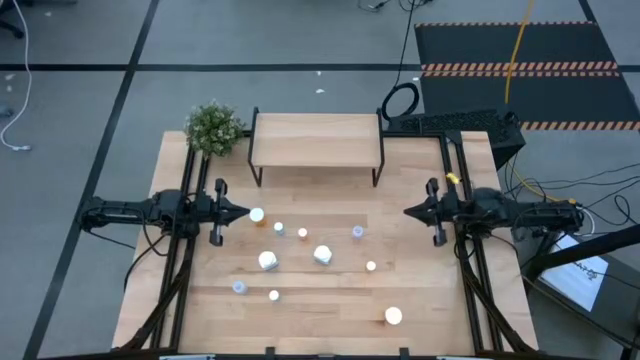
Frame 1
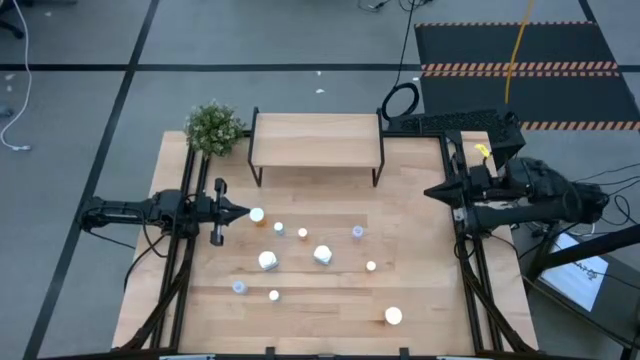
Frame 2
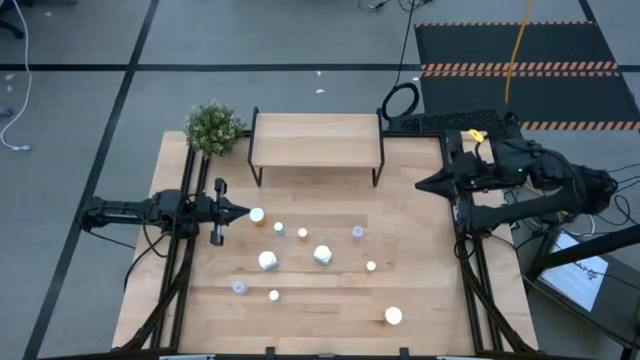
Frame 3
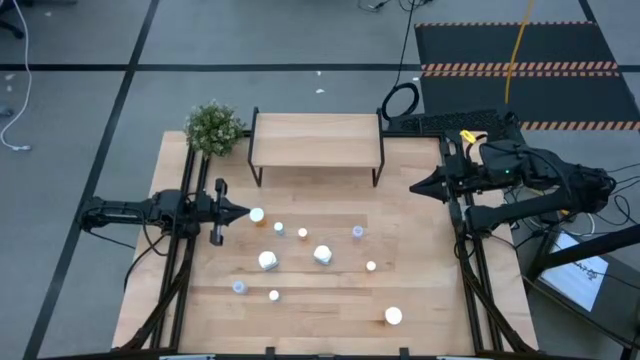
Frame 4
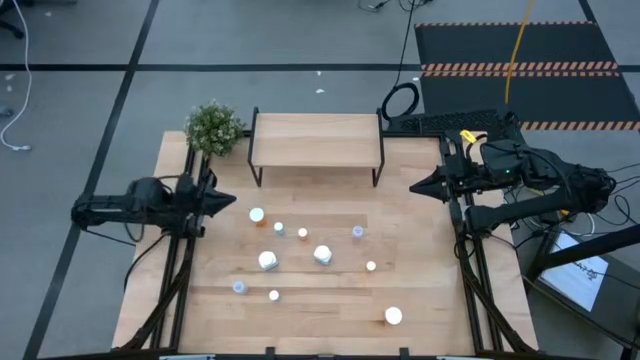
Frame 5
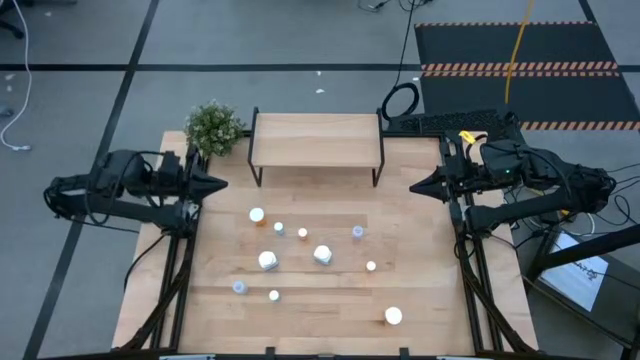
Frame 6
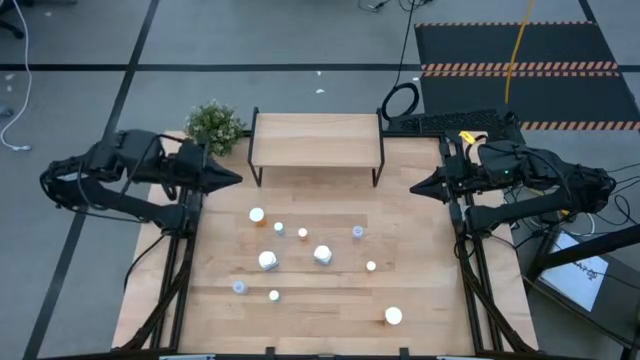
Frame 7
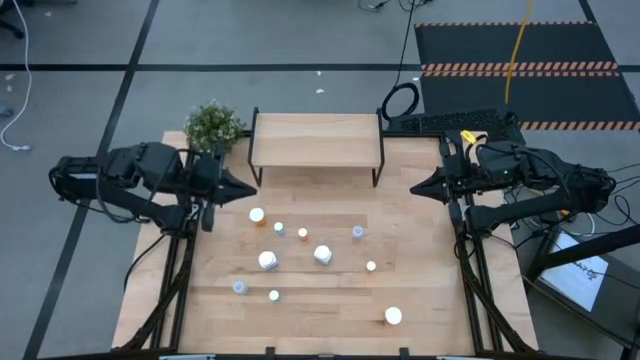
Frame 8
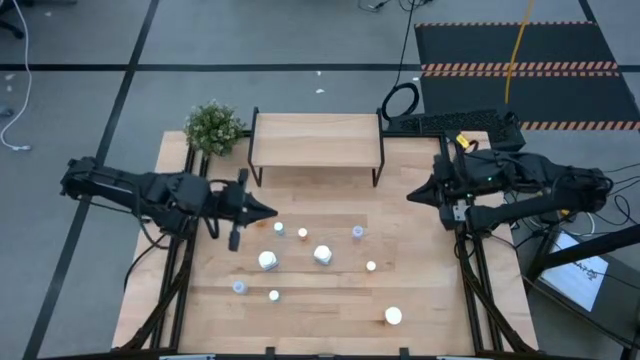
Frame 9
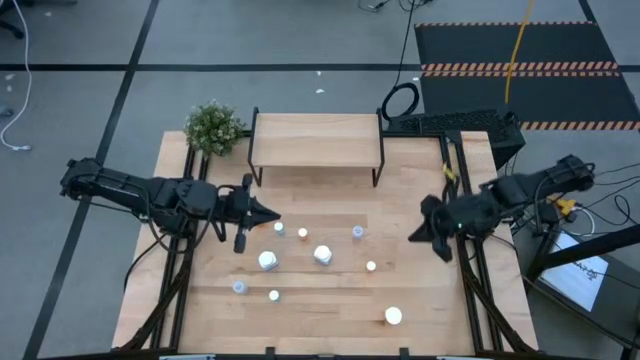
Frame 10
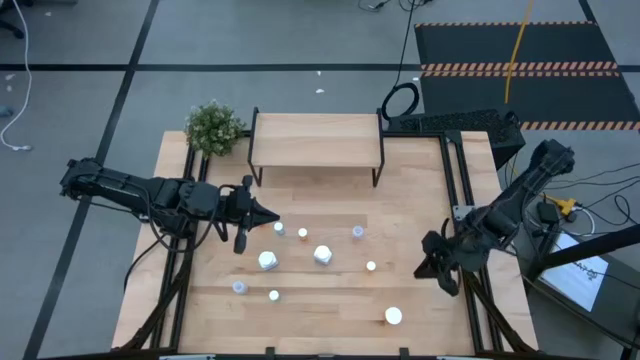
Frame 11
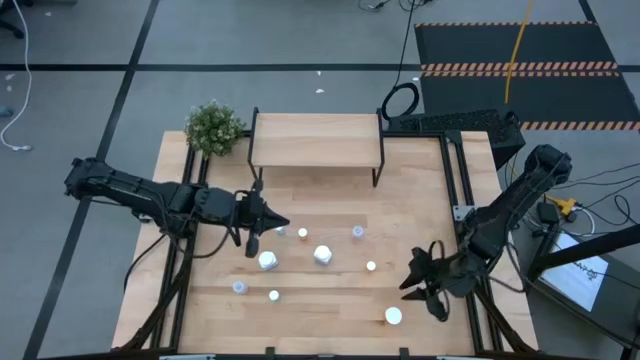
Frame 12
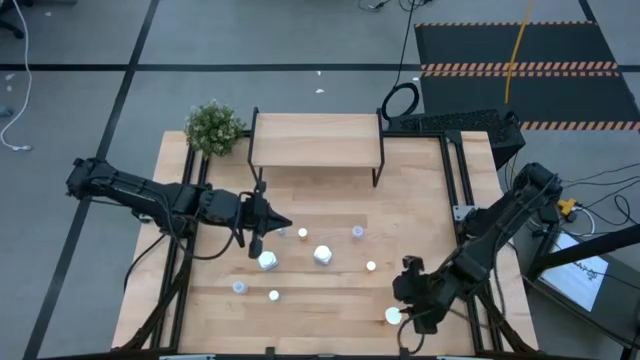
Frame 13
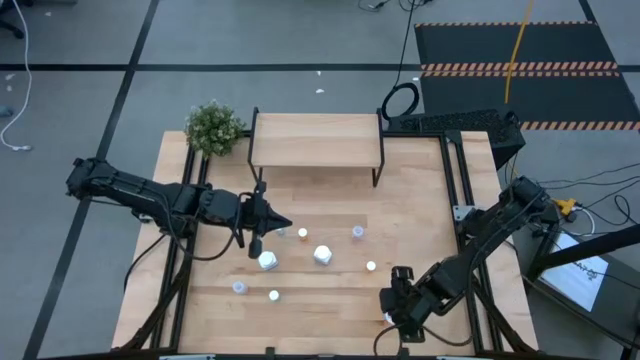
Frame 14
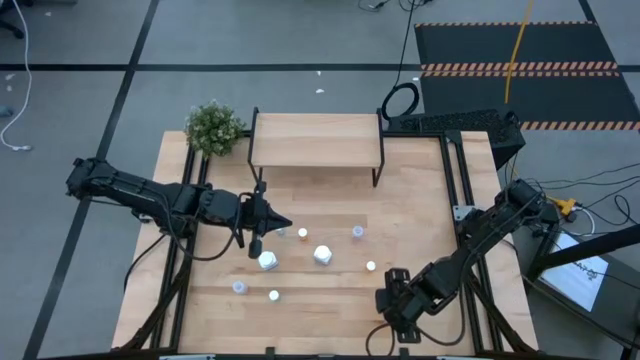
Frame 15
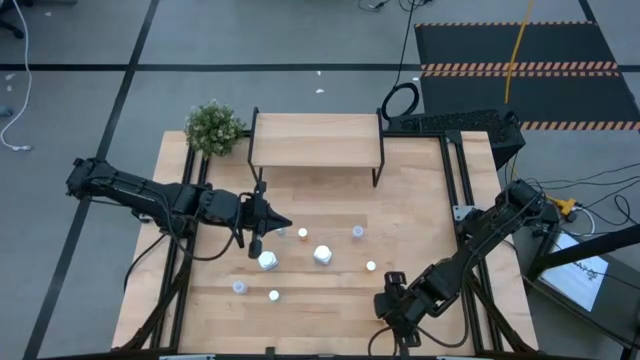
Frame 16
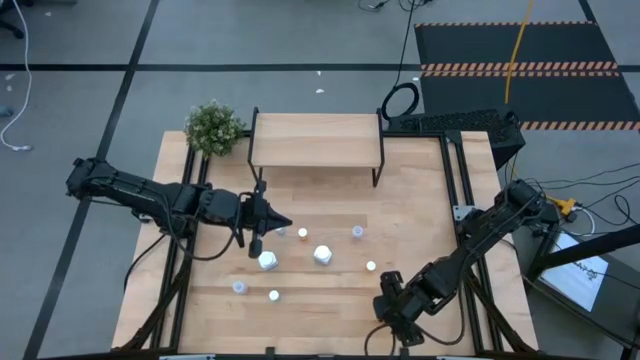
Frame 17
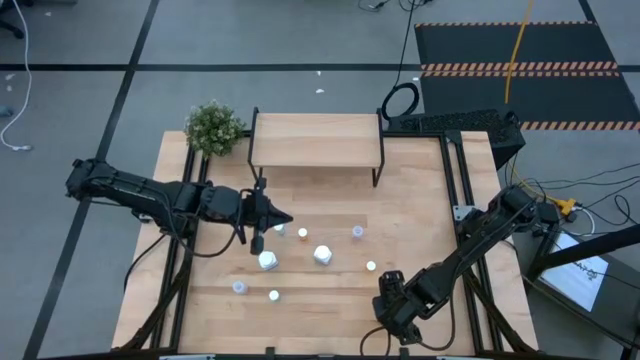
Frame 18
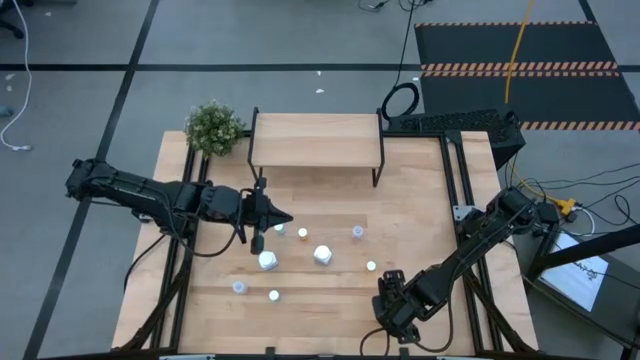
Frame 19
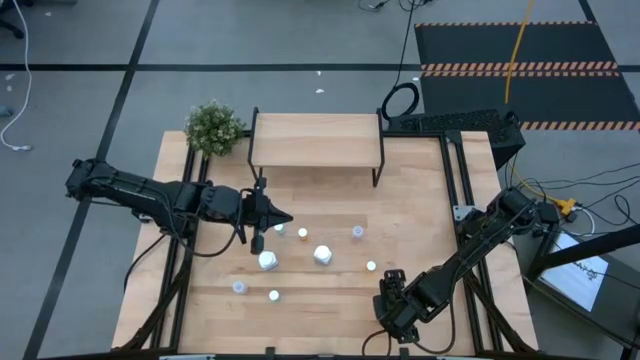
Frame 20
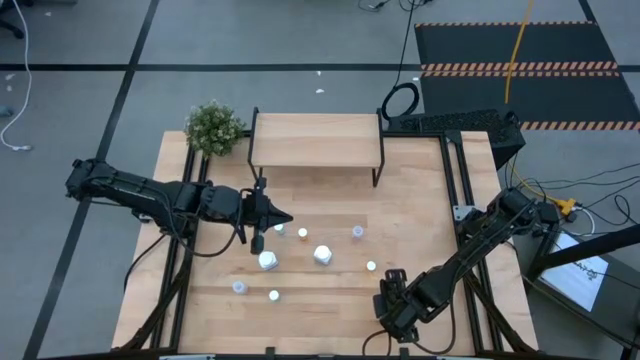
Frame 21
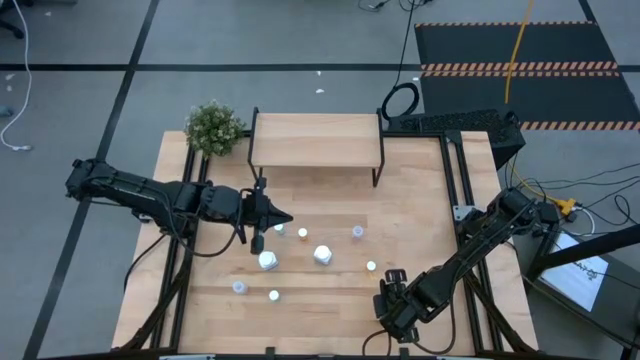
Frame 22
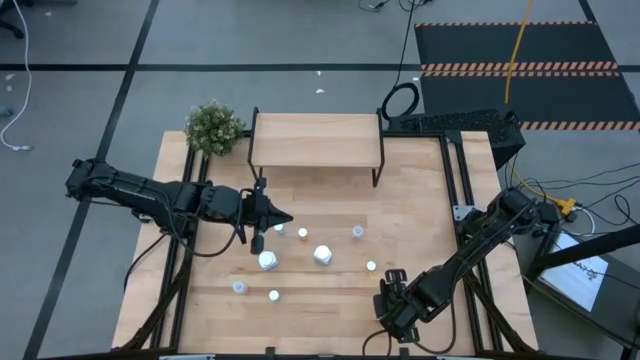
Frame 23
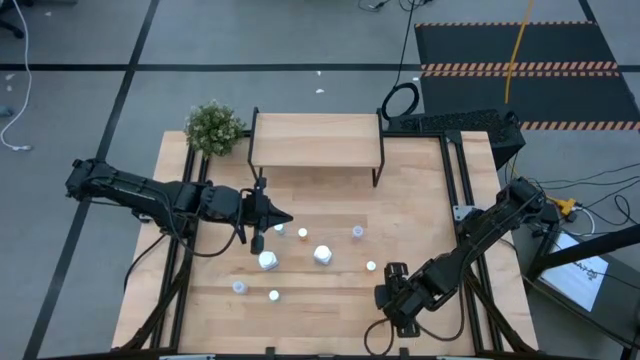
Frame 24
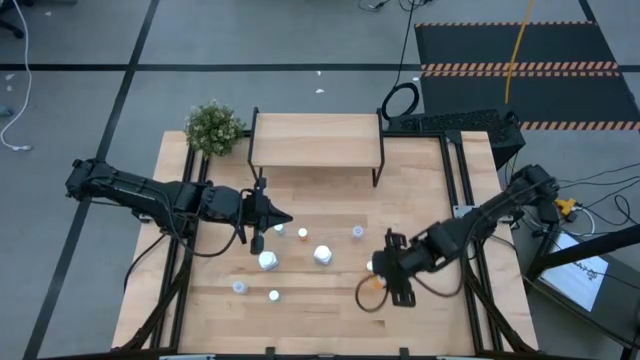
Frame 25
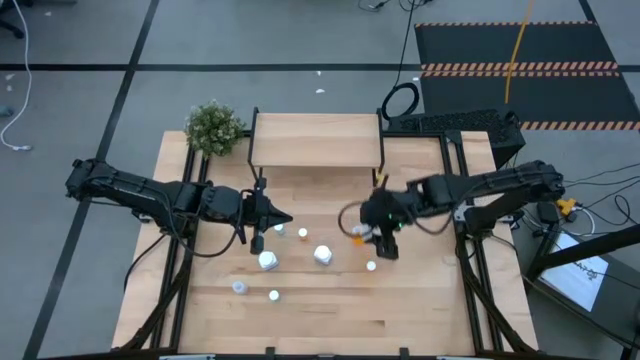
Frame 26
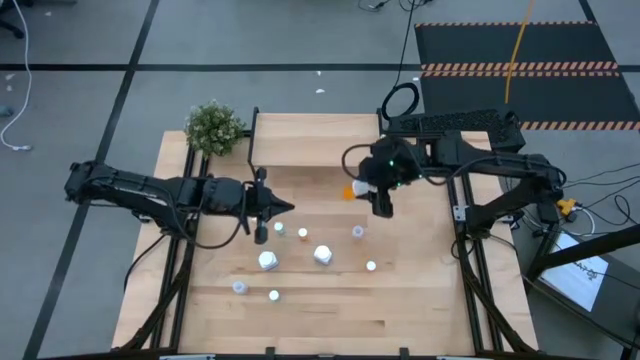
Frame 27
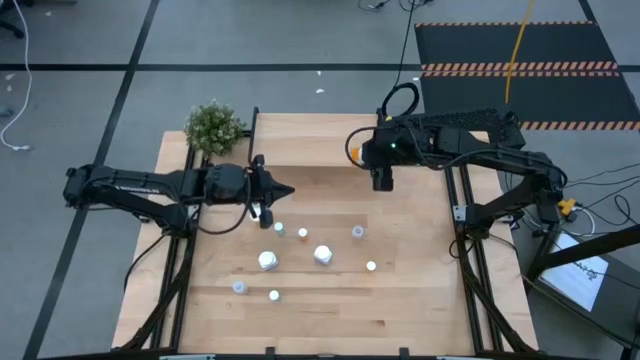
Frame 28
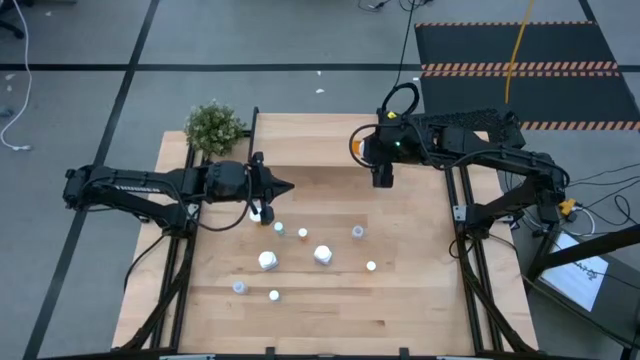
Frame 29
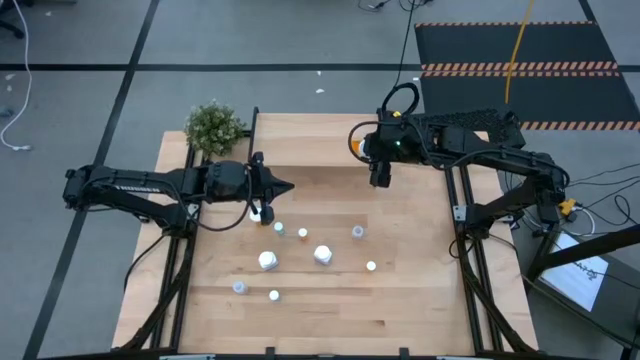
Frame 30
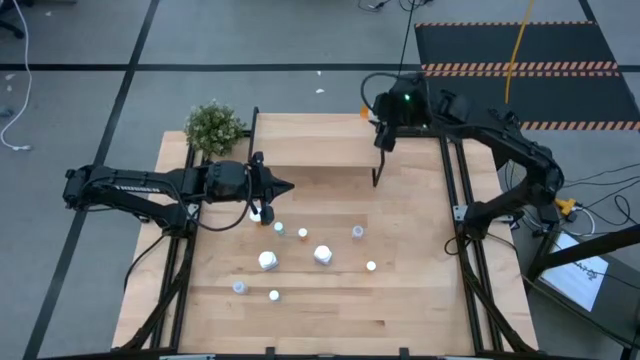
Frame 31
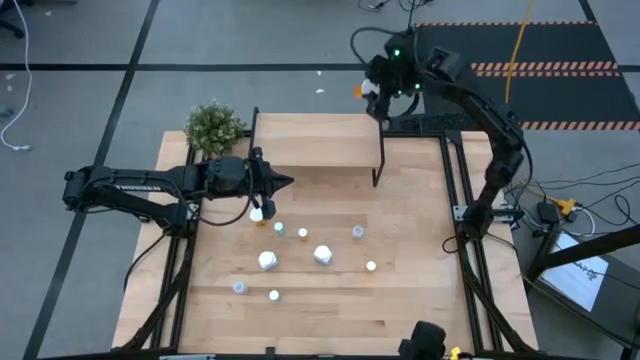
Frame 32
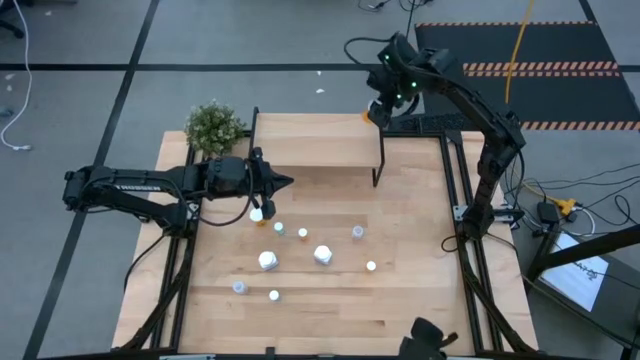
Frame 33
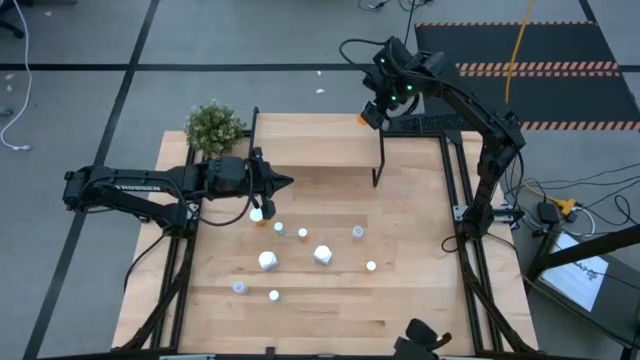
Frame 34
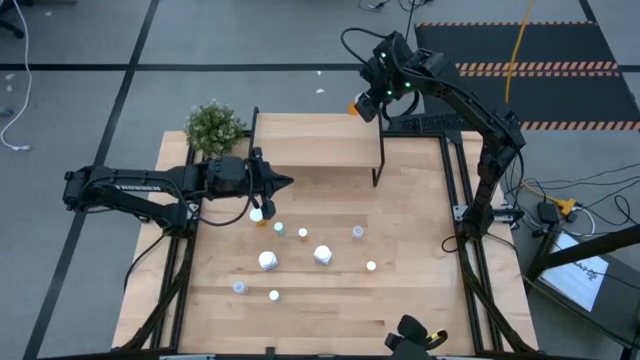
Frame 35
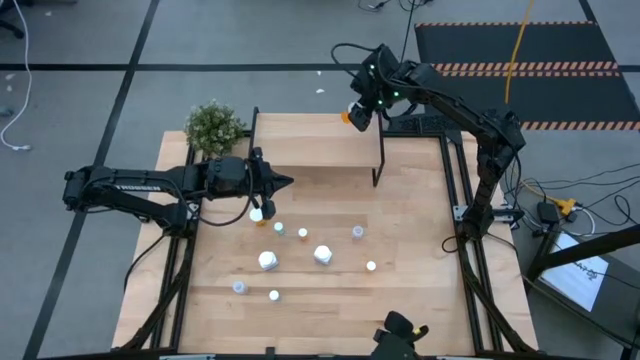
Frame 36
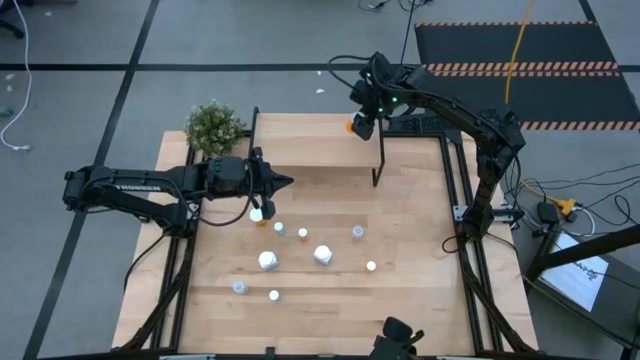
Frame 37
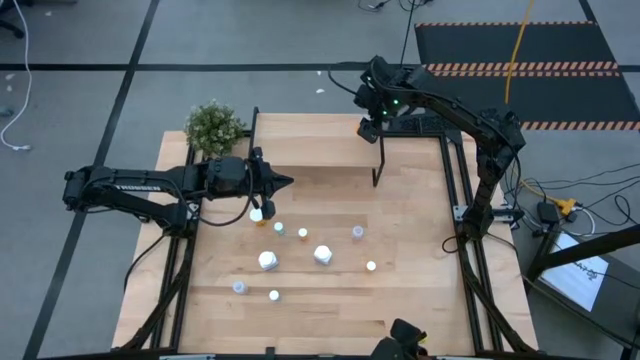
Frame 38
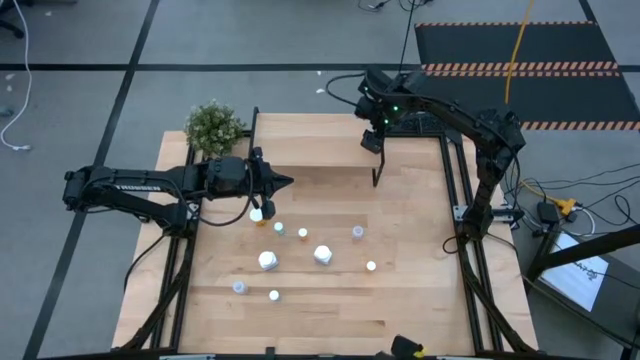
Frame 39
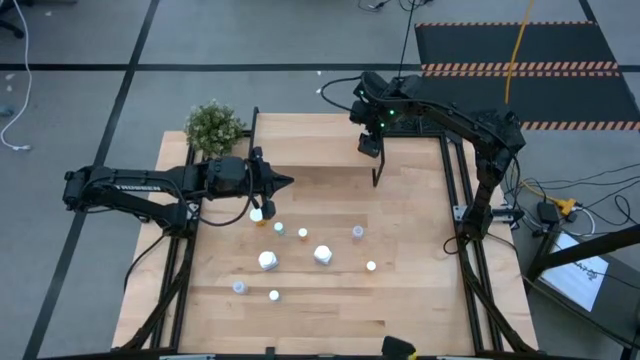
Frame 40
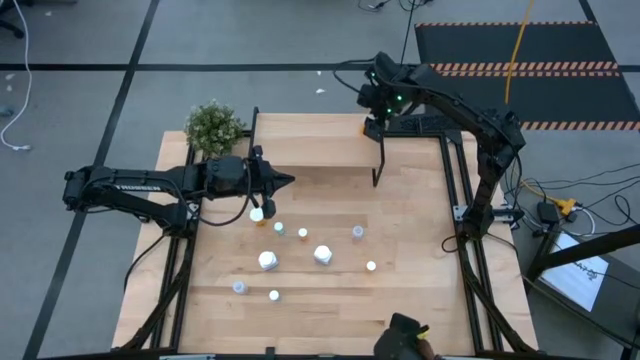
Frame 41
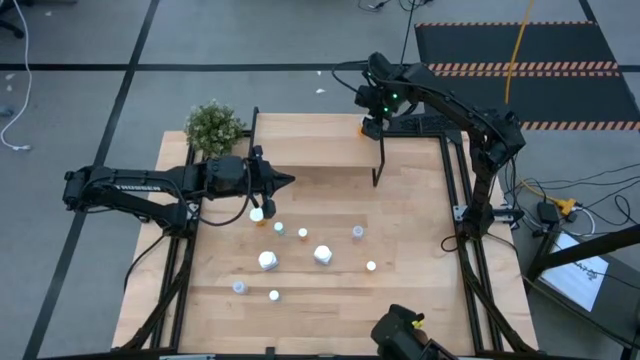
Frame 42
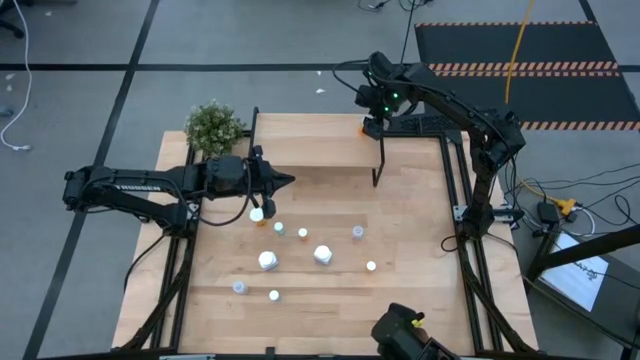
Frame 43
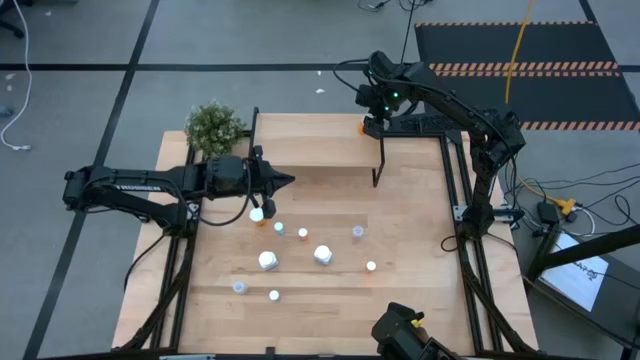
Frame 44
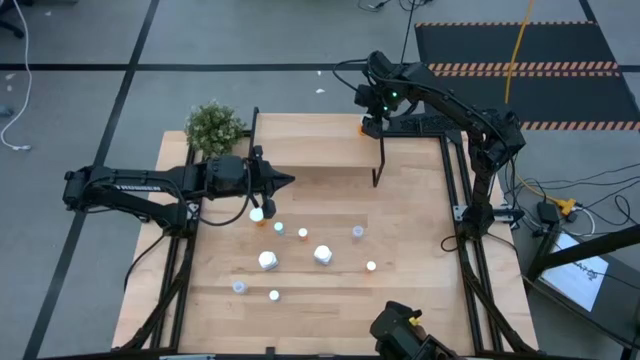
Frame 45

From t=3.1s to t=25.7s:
Task: Pick and place medicine bottles onto shelf by color
Put the bottom big orange pill bottle on the shelf
